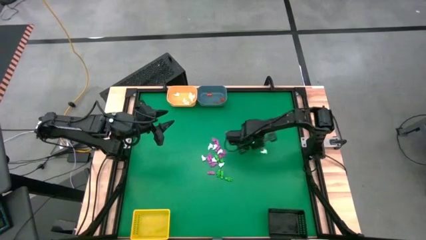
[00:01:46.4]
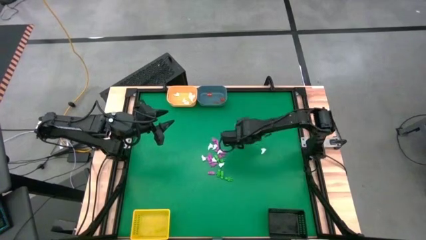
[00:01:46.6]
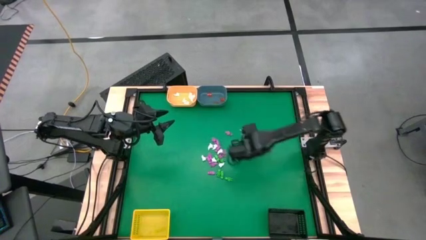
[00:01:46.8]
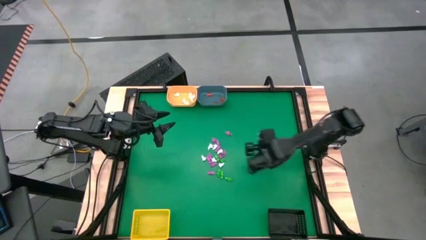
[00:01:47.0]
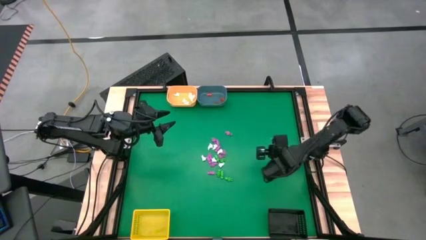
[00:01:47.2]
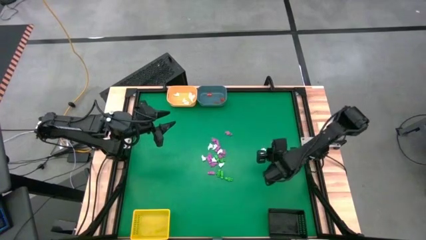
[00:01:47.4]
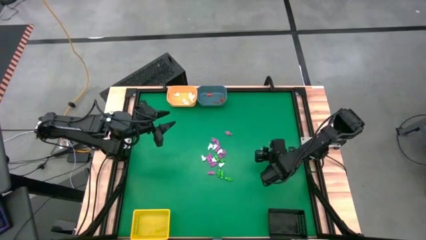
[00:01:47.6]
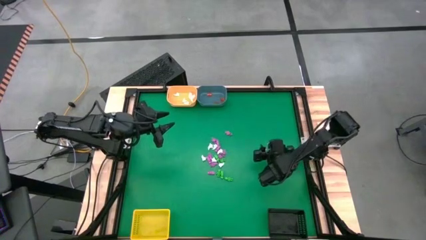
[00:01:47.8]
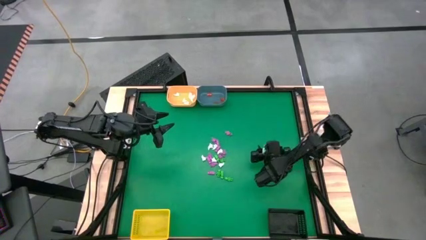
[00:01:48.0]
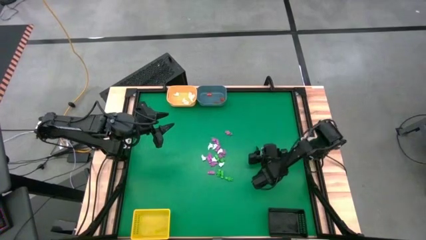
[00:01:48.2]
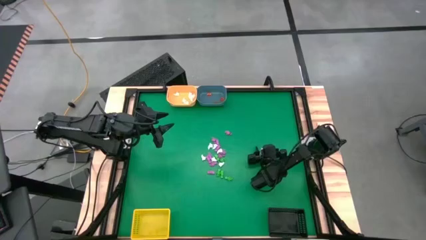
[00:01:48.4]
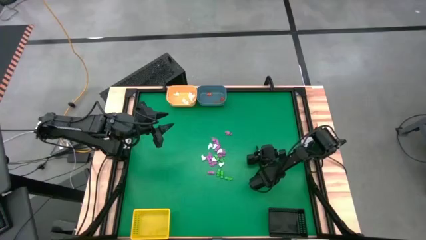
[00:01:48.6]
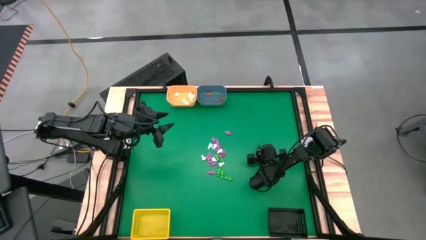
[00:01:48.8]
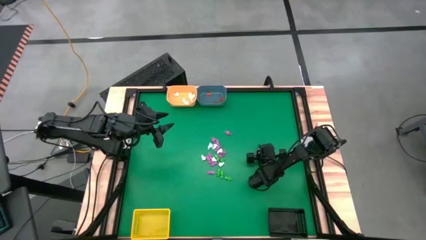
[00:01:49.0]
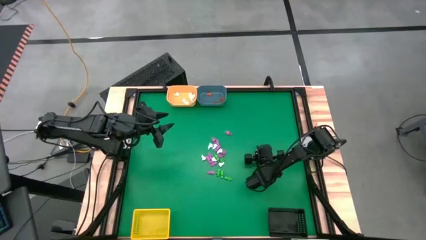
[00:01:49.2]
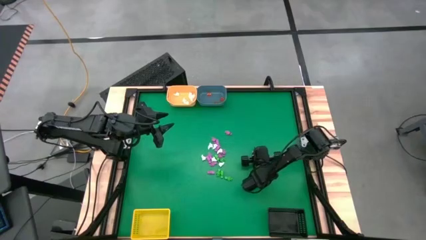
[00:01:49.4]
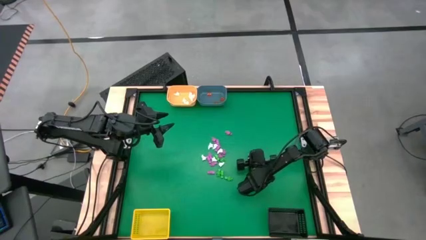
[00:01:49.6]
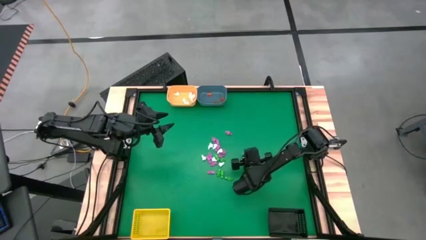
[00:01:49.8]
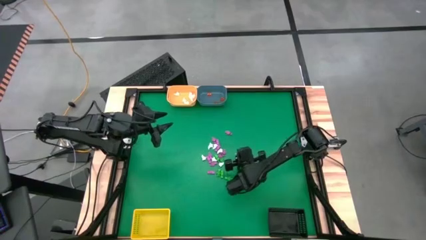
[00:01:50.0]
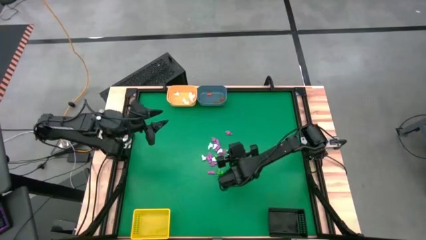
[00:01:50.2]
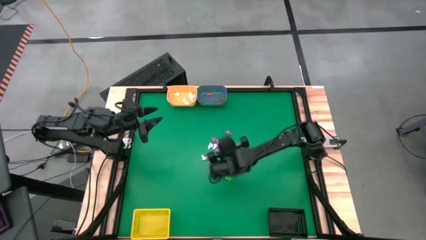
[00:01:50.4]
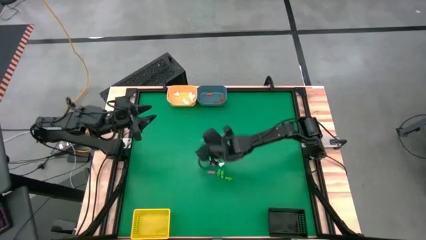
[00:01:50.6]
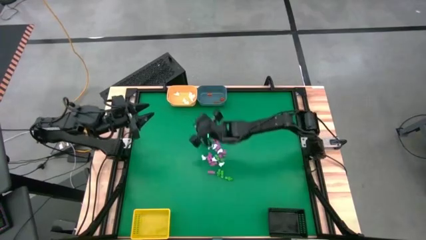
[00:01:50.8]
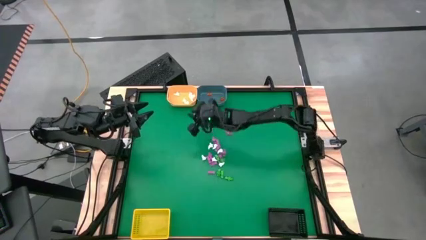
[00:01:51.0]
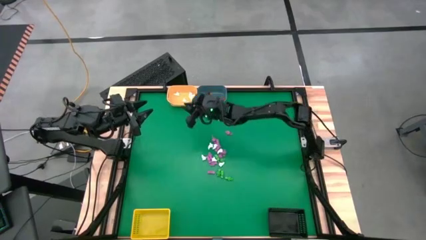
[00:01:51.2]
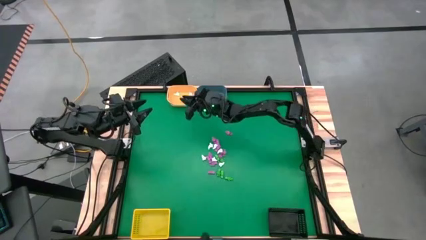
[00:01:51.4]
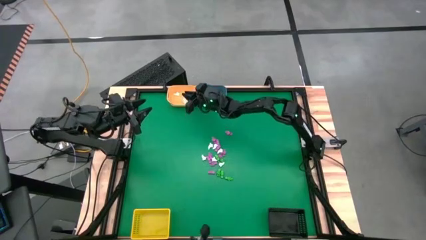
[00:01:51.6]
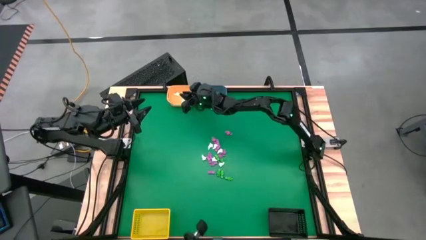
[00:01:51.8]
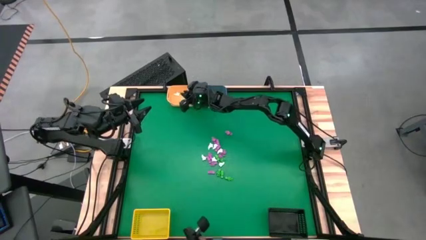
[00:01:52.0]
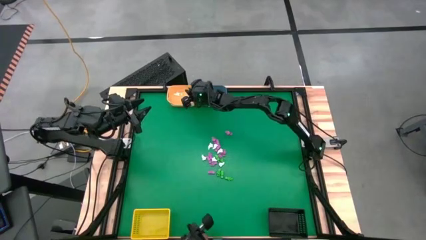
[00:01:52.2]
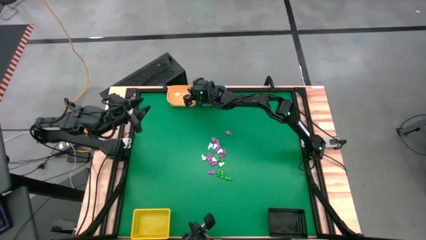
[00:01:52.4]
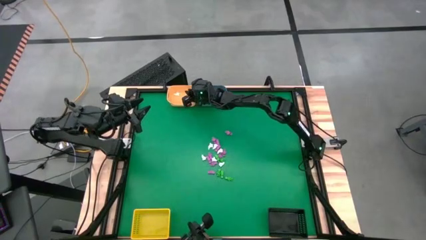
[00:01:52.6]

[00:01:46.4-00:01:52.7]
Task: Sort Halloween decoration
Put the white ghost into the orange bin

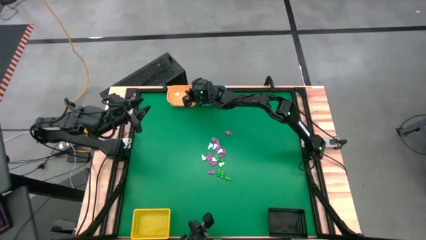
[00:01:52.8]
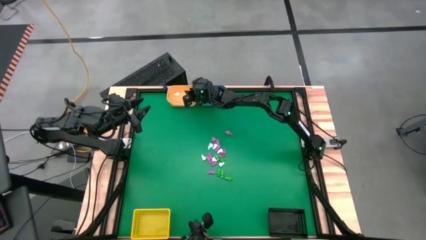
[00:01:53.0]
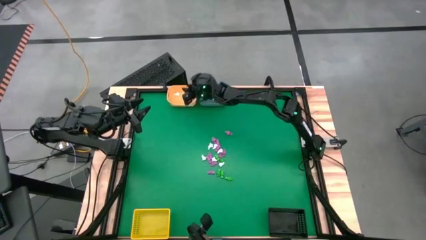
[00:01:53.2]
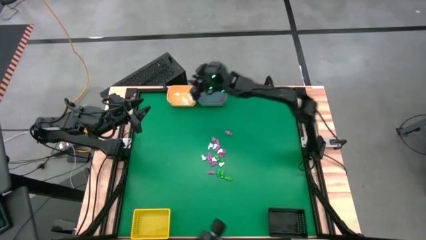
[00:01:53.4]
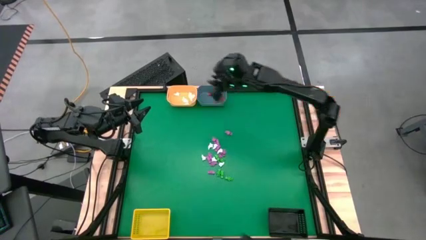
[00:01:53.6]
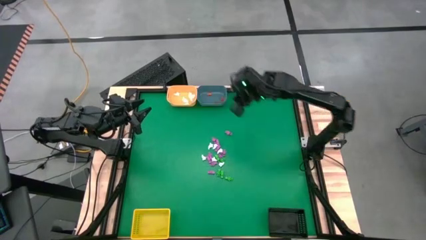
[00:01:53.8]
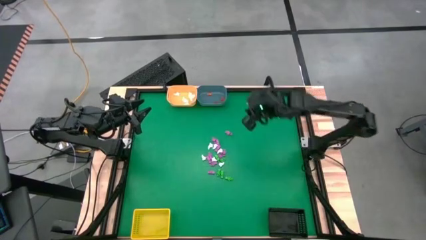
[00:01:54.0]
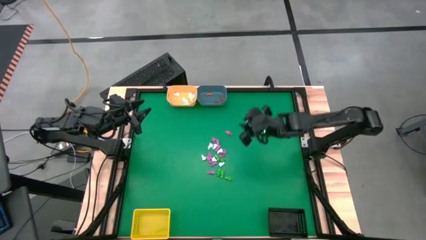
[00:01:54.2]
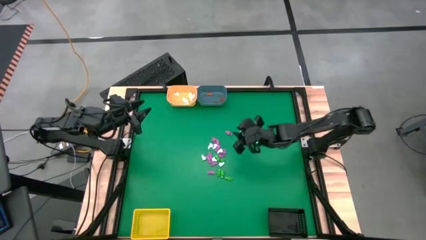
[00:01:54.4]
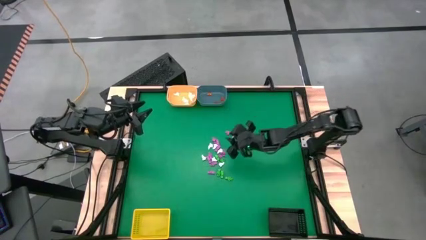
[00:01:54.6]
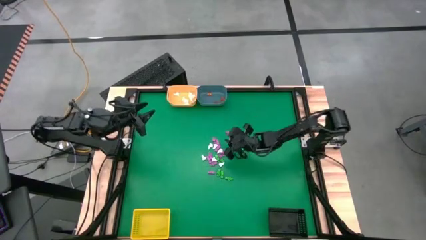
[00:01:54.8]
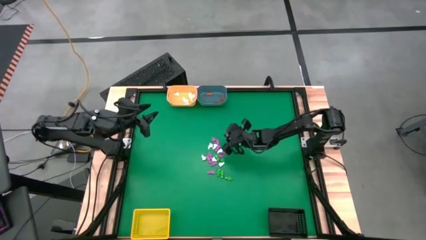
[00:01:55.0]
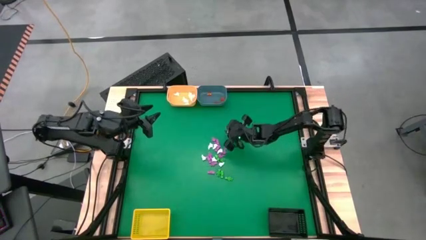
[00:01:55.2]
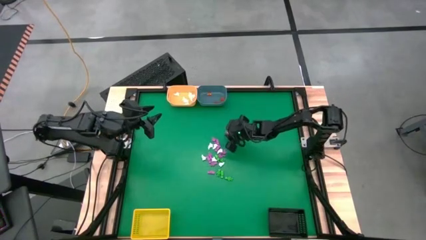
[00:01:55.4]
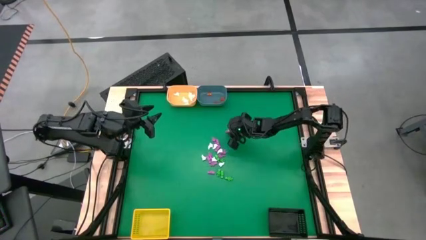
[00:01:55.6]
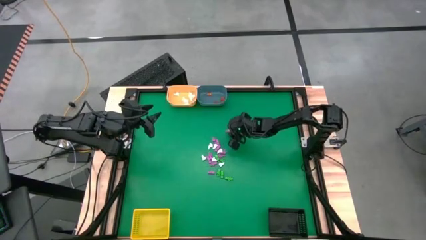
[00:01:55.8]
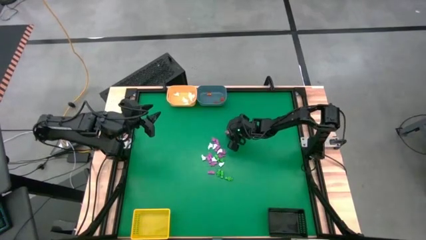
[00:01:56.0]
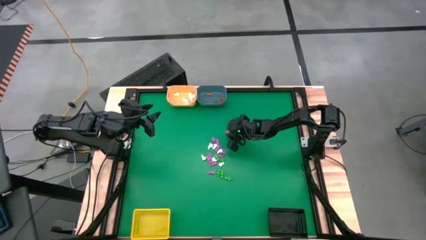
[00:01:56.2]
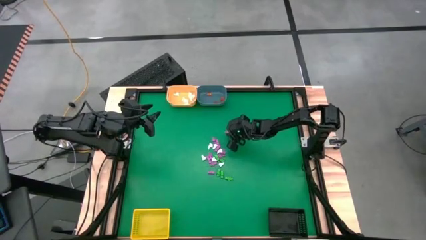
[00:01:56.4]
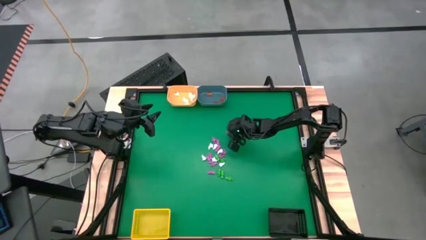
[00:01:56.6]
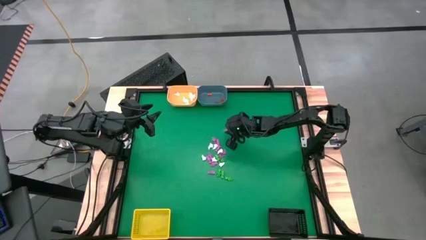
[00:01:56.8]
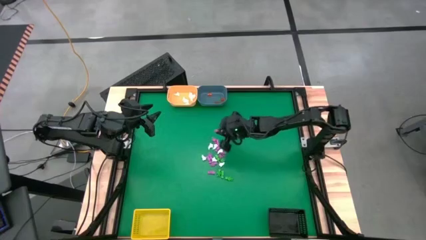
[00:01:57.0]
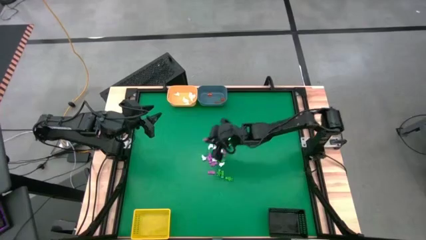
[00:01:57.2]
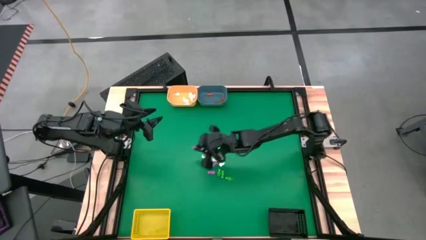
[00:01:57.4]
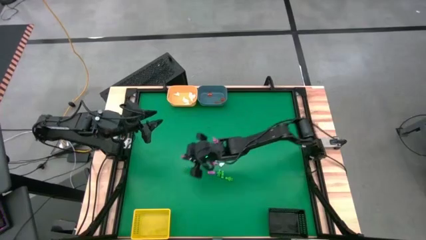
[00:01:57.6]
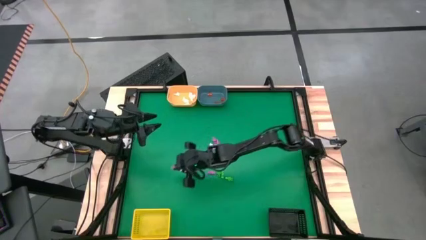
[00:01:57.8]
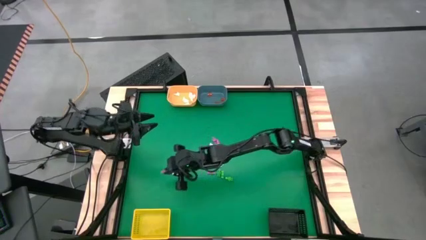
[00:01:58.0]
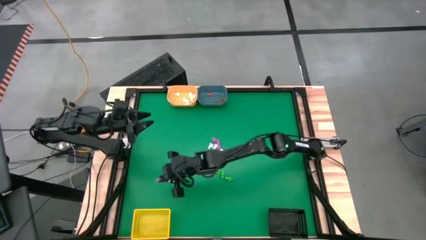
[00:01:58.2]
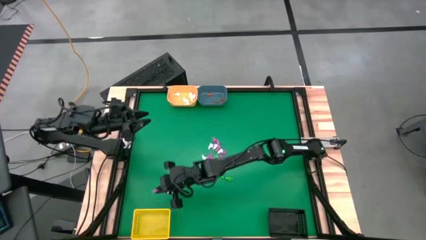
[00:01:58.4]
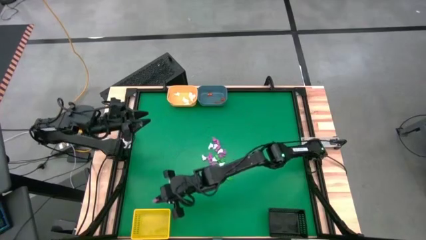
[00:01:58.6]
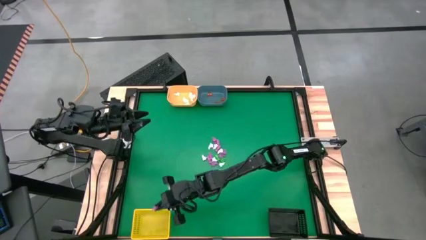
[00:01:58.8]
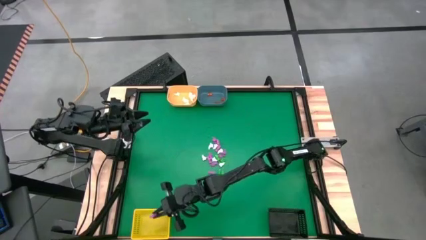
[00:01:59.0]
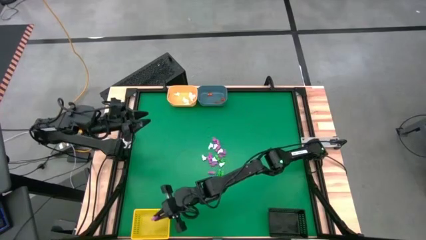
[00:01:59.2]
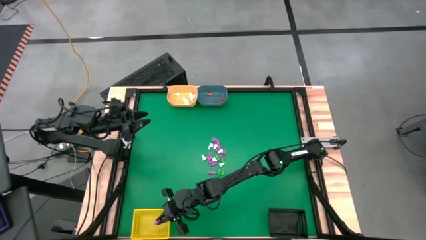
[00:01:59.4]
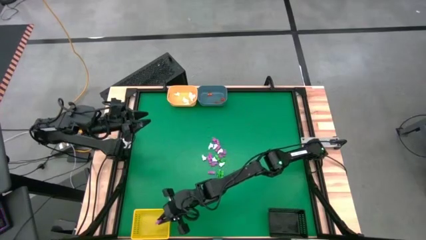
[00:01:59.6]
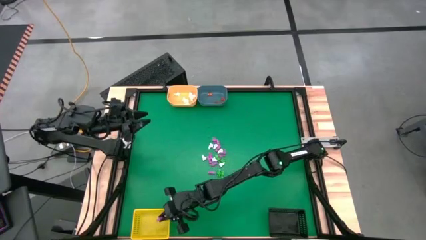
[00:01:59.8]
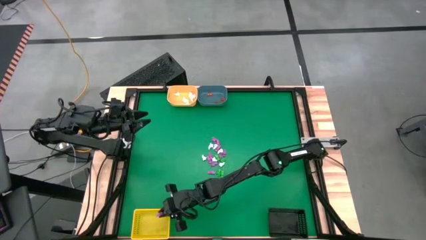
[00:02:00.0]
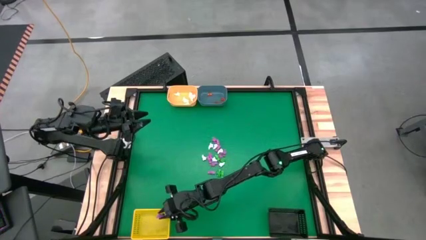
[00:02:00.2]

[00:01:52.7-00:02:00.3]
Put the pink skeleton into the yellow bin

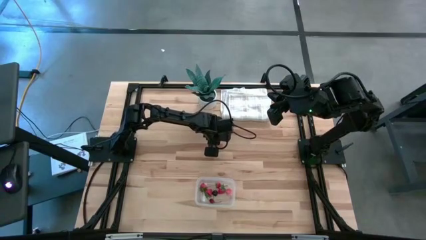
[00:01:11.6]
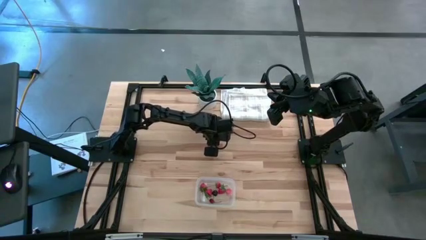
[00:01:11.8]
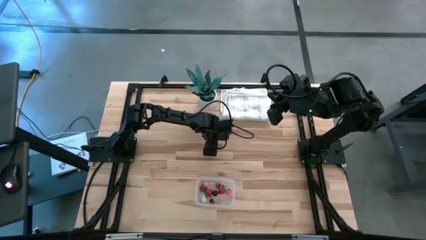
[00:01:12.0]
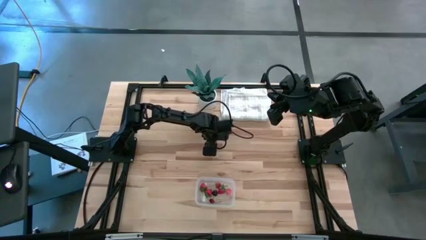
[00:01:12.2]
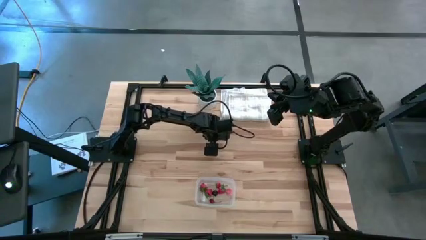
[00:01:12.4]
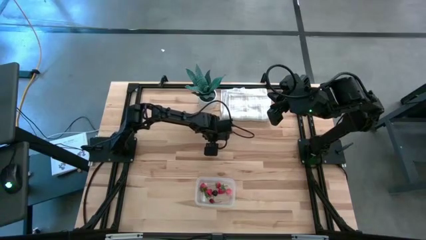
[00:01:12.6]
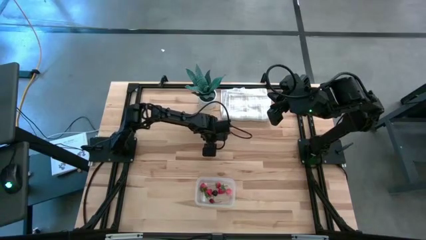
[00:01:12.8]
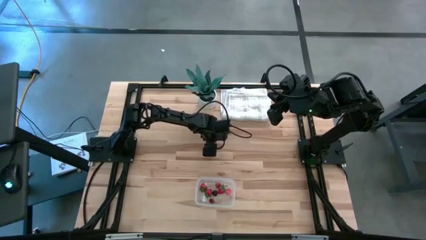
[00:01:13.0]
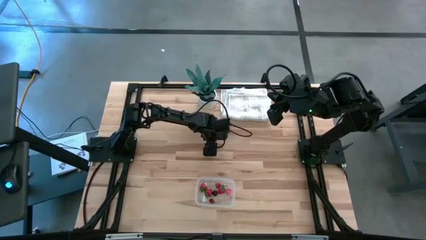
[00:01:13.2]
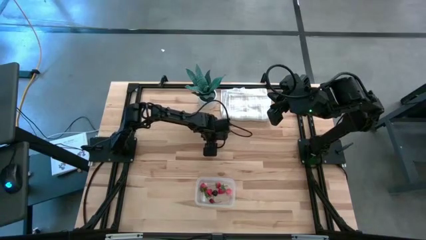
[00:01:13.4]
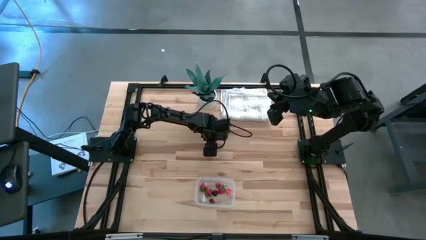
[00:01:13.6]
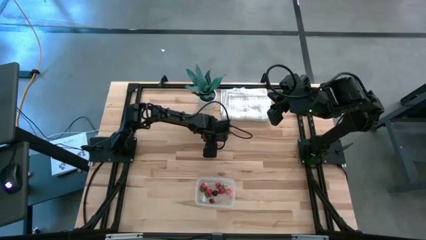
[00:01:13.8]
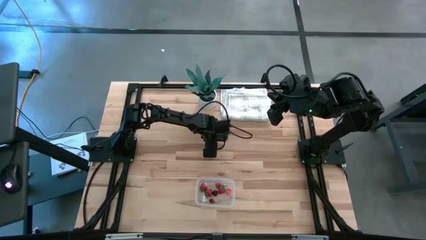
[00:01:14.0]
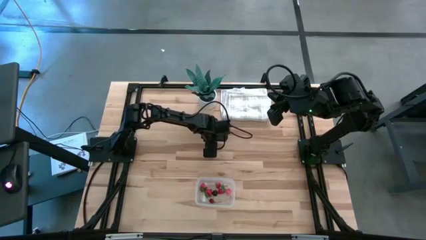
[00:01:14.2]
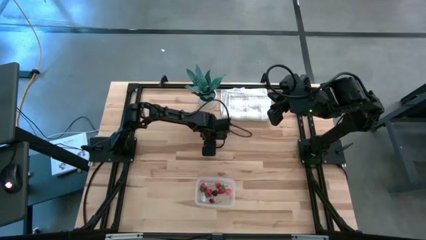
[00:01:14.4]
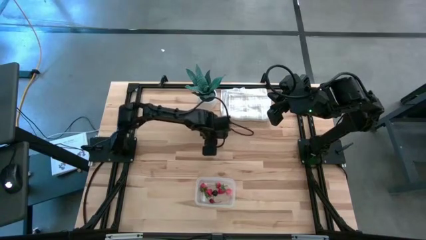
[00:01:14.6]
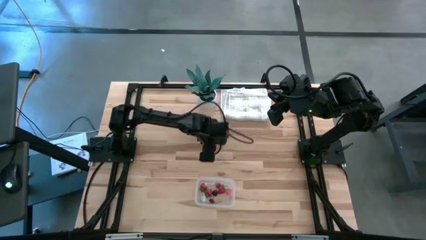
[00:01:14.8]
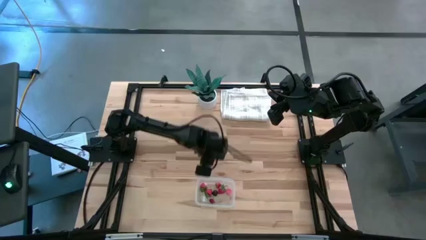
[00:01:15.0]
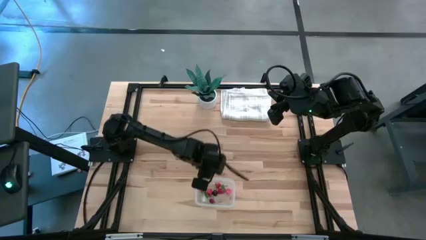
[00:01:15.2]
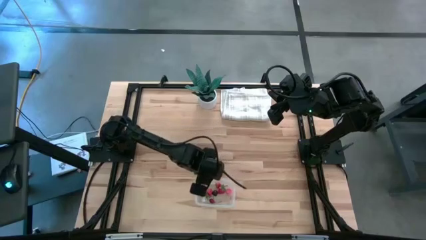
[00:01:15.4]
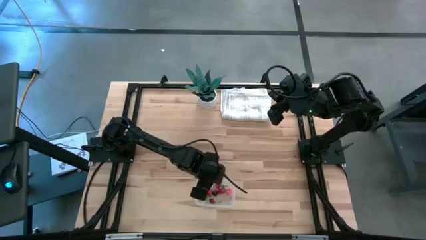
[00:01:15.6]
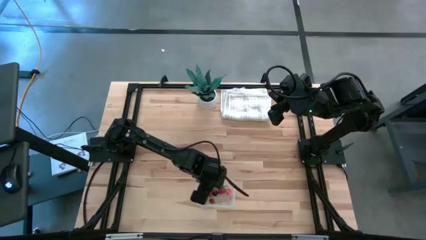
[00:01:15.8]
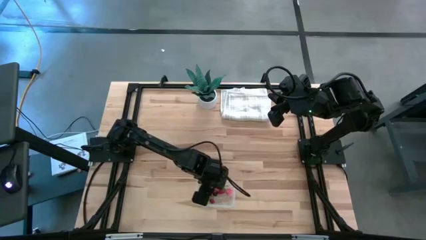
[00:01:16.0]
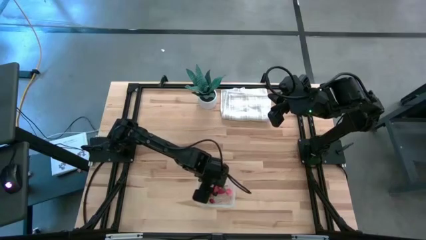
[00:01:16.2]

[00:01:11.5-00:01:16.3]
Task: Pick and placing Produce into tupperware
Put the raspberry into the transparent bin
